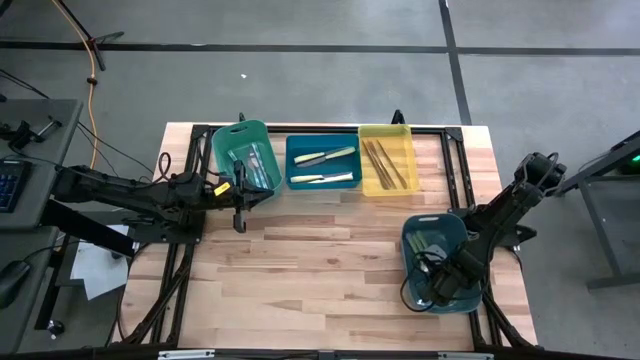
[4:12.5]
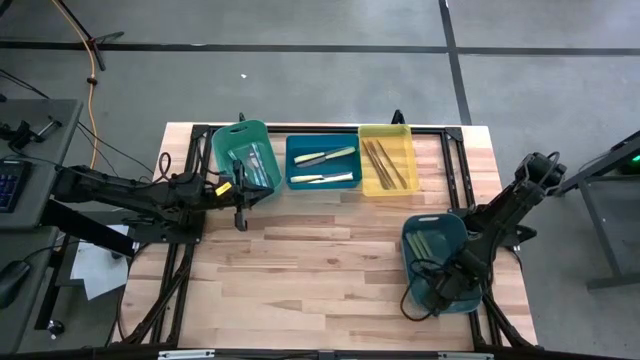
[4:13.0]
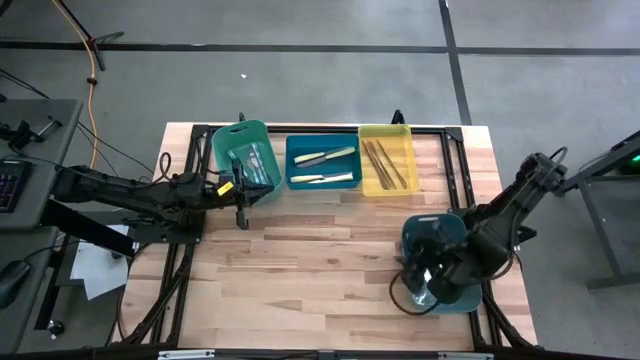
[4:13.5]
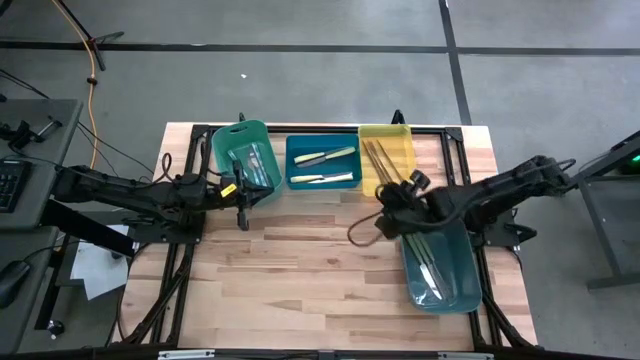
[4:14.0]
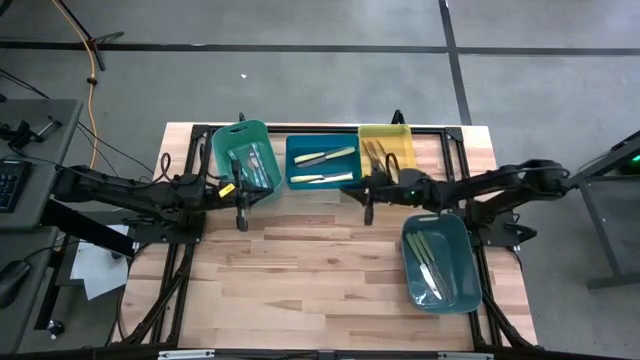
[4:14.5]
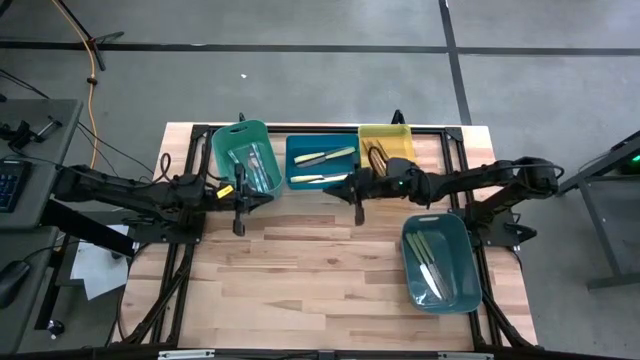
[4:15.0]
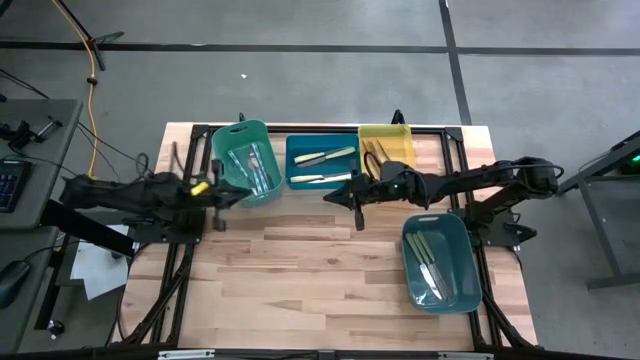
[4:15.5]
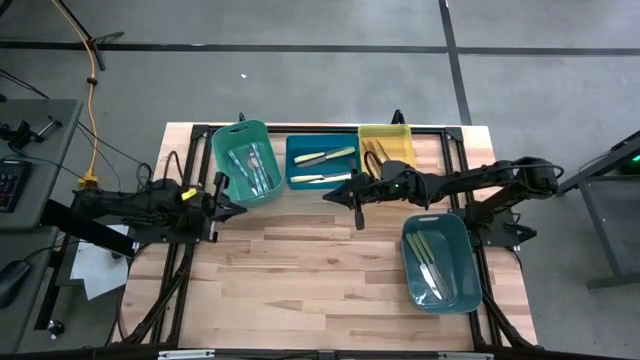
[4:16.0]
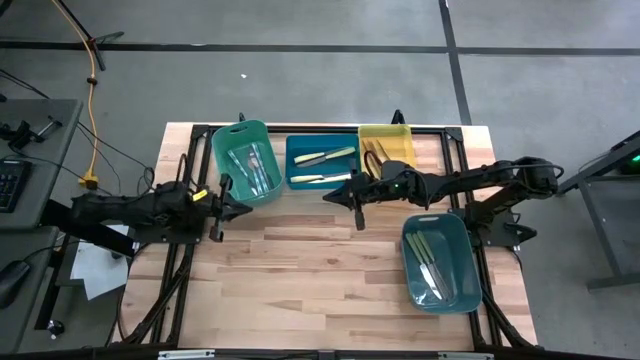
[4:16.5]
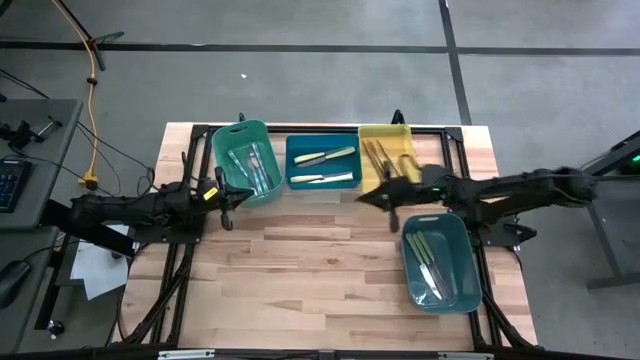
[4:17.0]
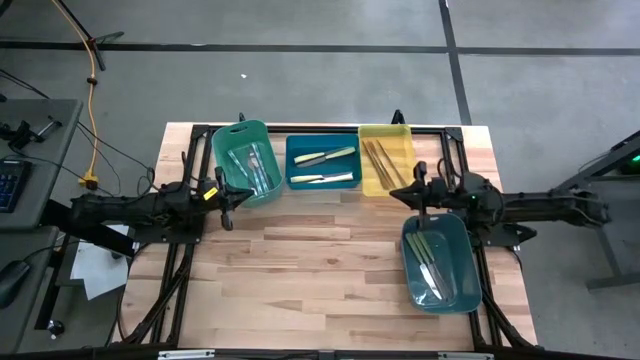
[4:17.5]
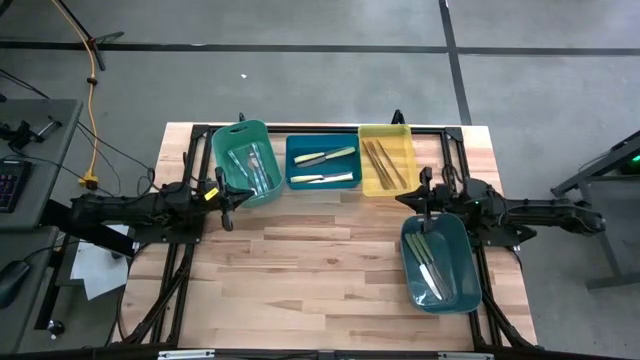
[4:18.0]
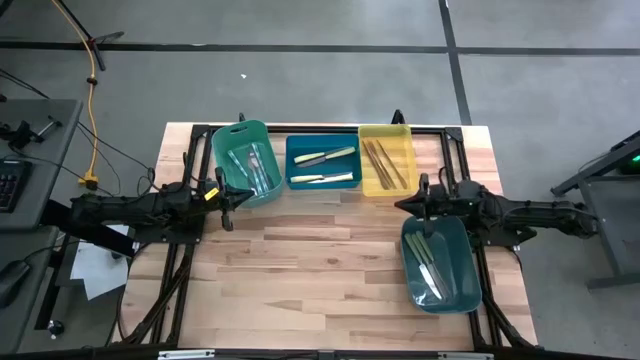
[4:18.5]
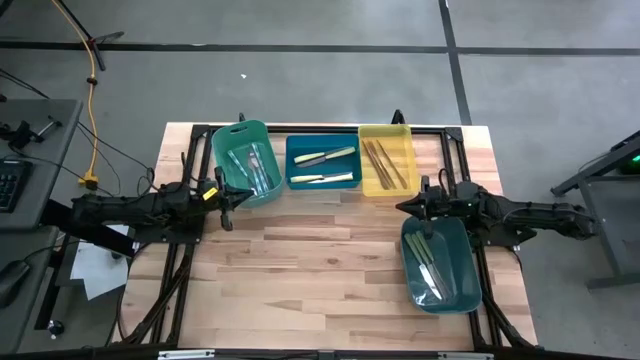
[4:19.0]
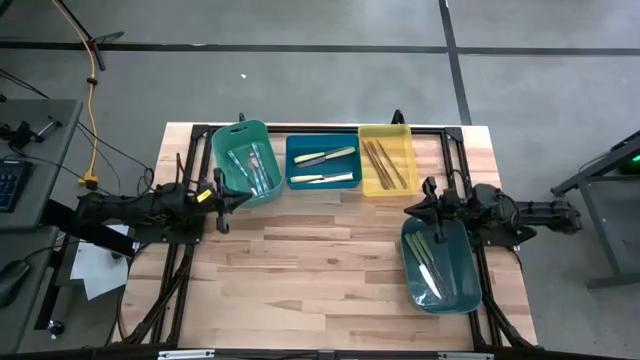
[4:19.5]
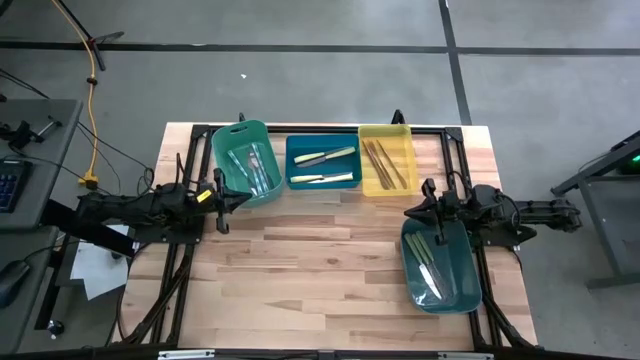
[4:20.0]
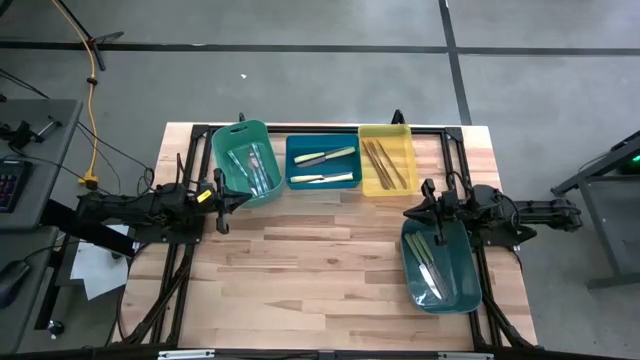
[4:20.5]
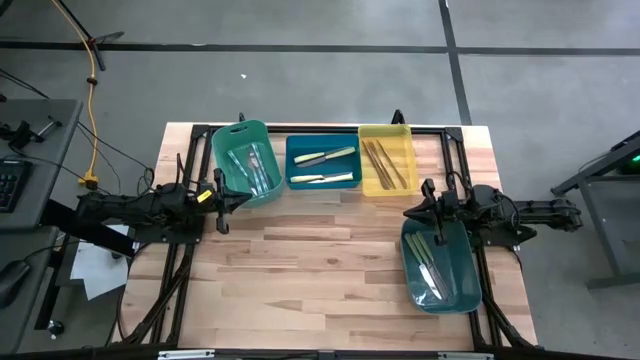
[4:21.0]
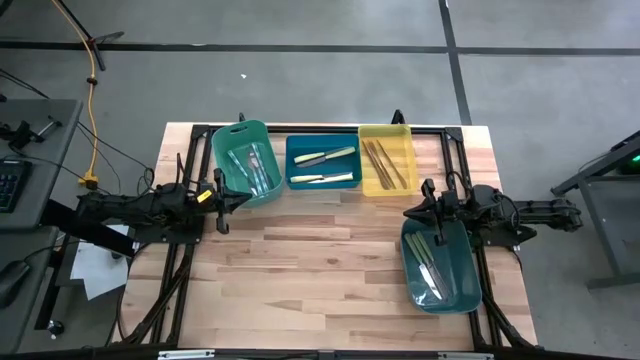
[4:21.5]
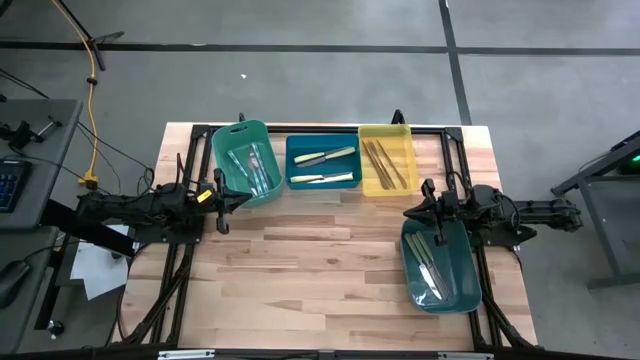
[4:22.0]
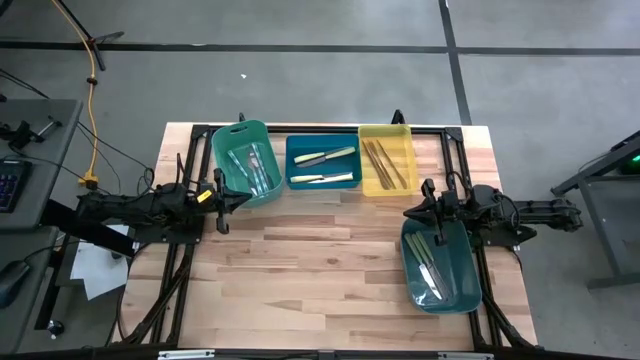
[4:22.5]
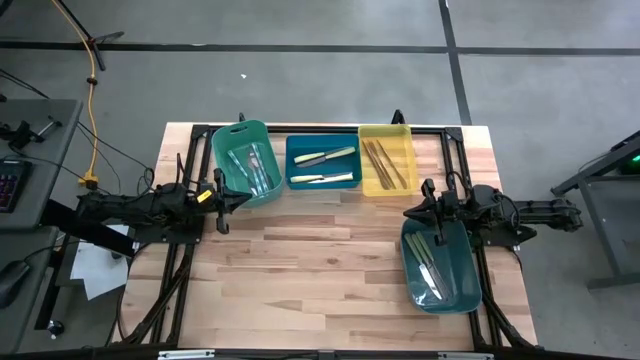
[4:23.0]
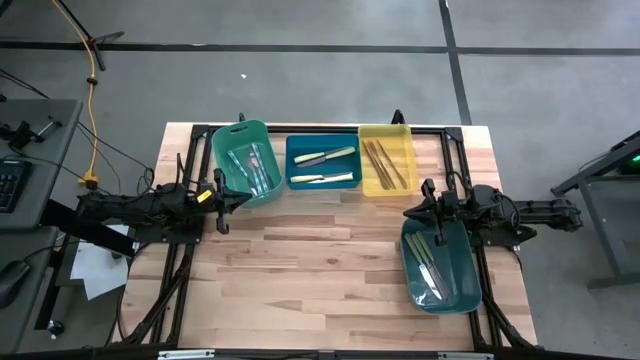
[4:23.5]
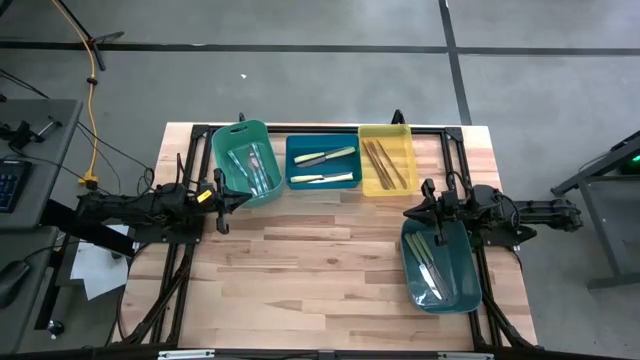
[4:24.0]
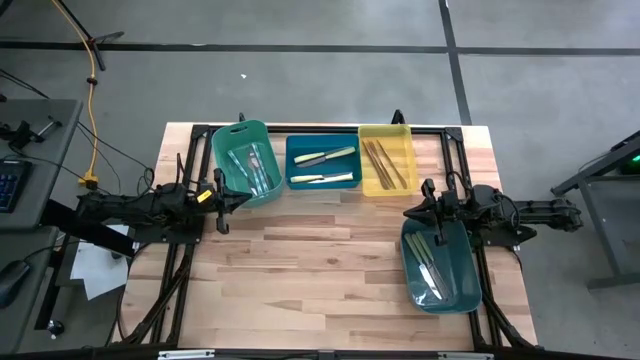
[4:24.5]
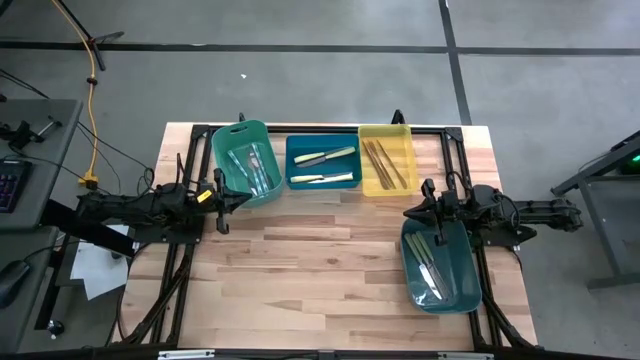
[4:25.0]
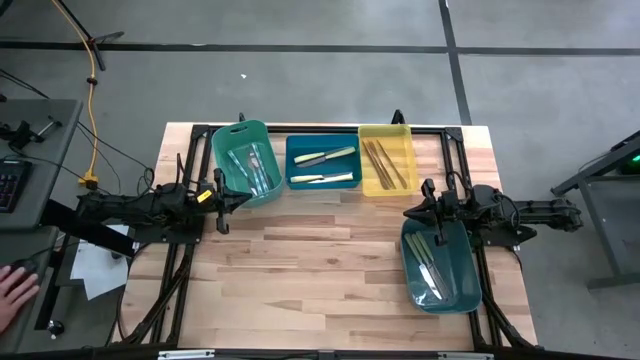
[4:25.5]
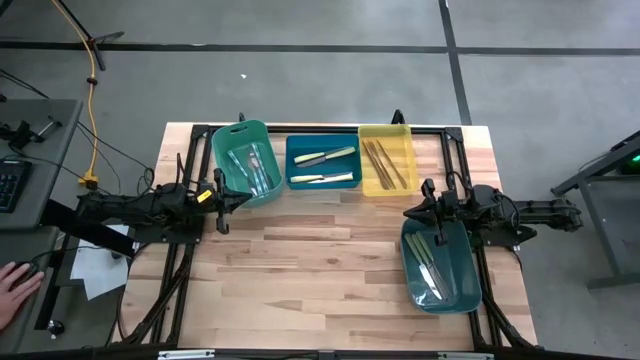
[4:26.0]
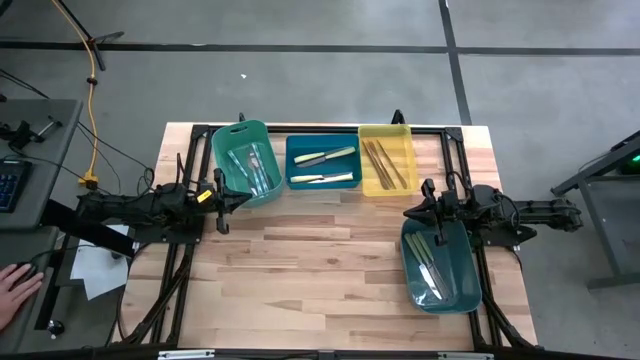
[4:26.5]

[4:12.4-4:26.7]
Task: Sort silverware by color (type)
Return to Home Position
